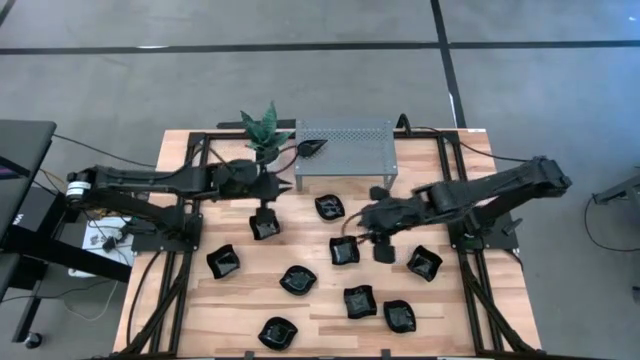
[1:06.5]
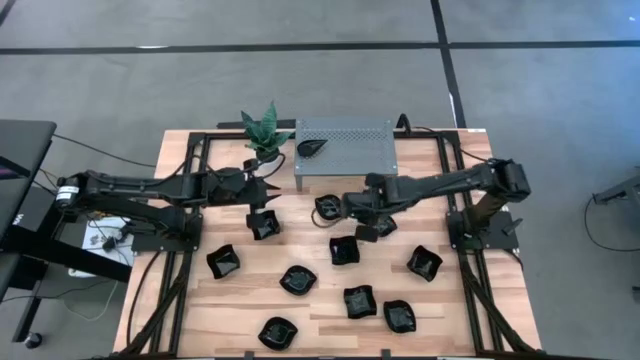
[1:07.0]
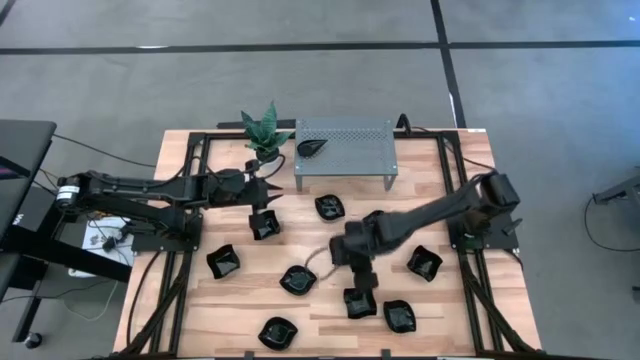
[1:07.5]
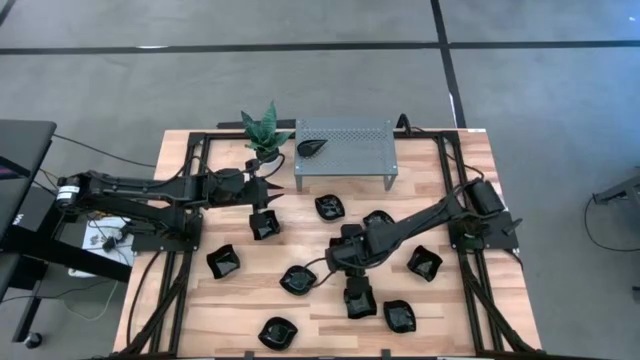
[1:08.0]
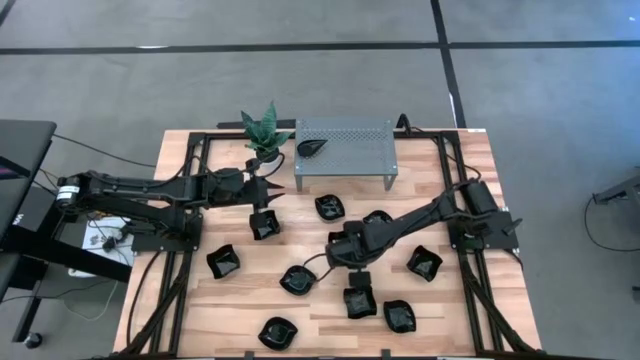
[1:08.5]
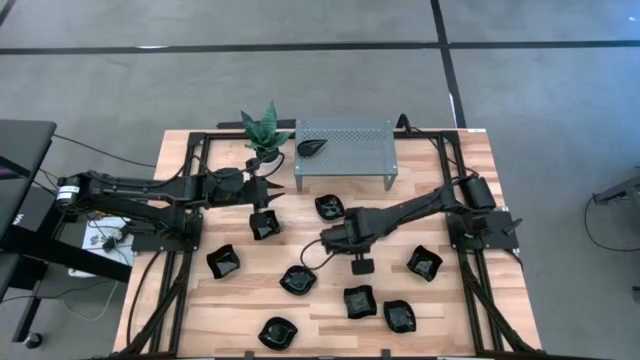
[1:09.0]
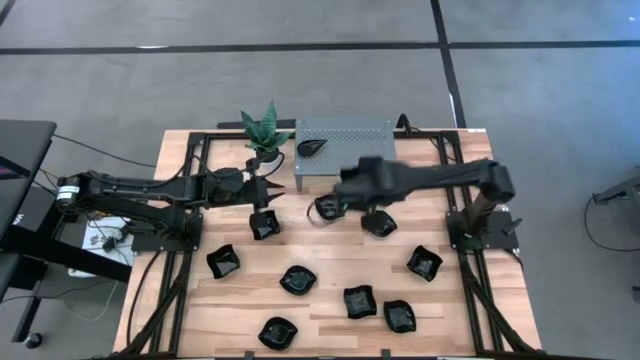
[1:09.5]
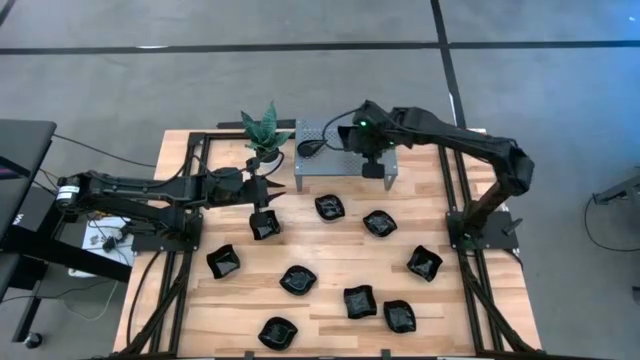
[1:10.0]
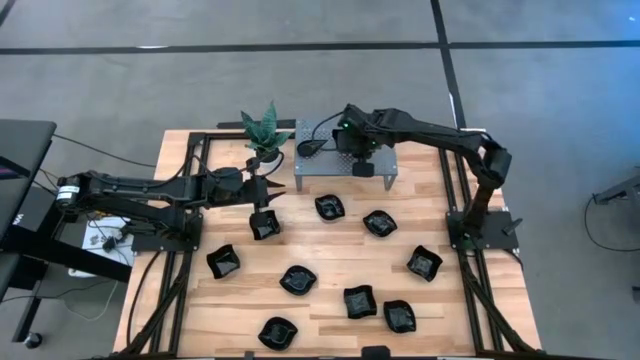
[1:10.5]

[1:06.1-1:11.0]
Task: Pick & Place Mini shaped plates
Put the distorted square plate on the shelf

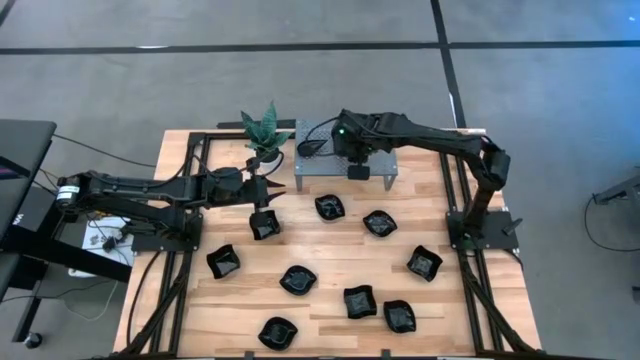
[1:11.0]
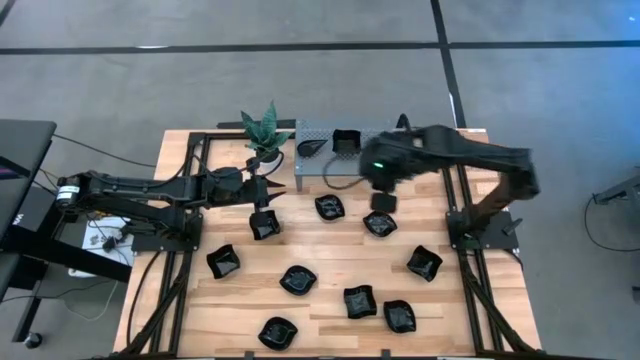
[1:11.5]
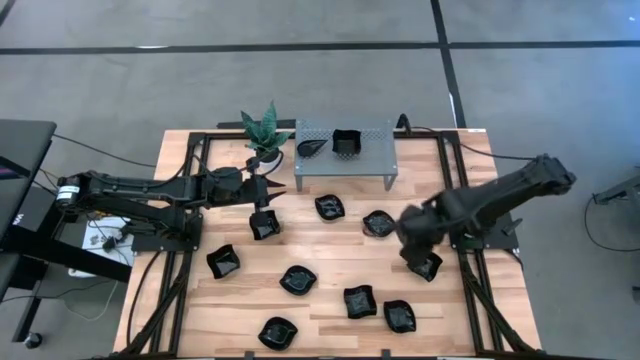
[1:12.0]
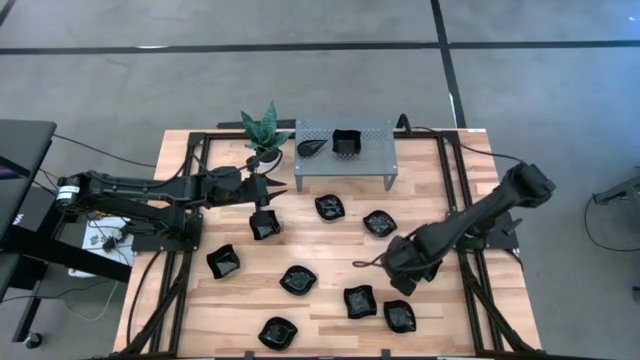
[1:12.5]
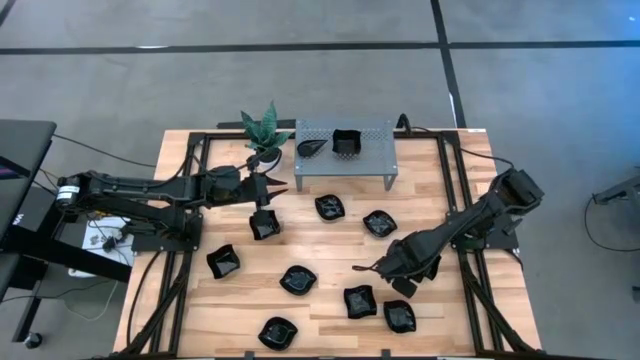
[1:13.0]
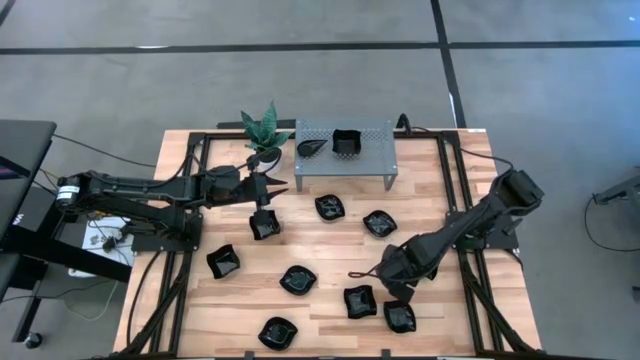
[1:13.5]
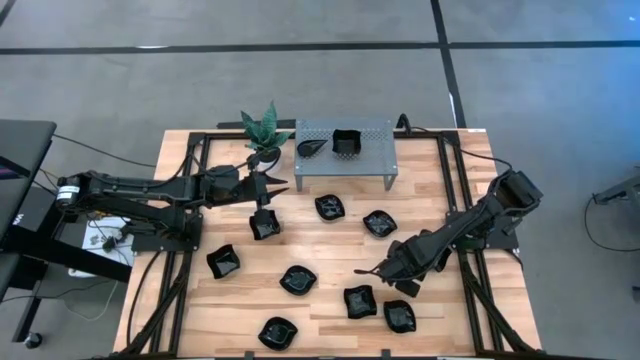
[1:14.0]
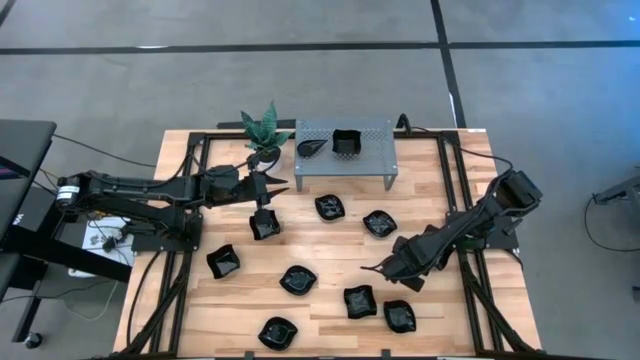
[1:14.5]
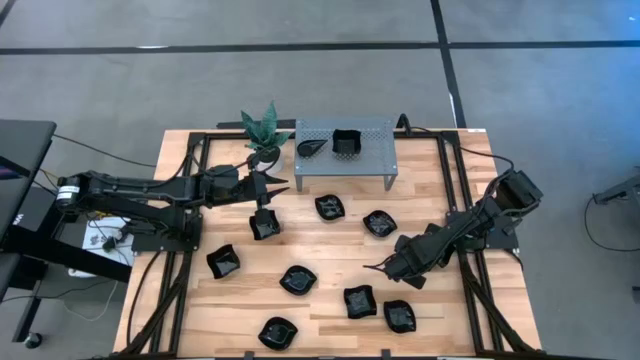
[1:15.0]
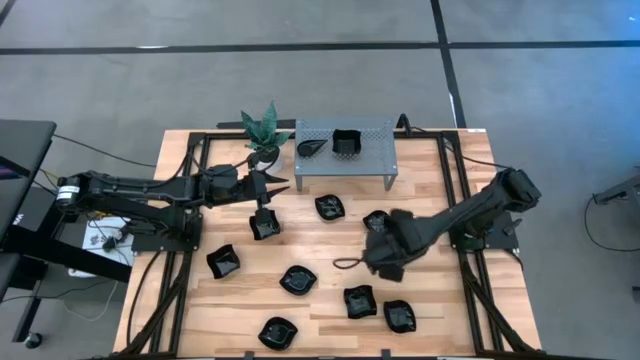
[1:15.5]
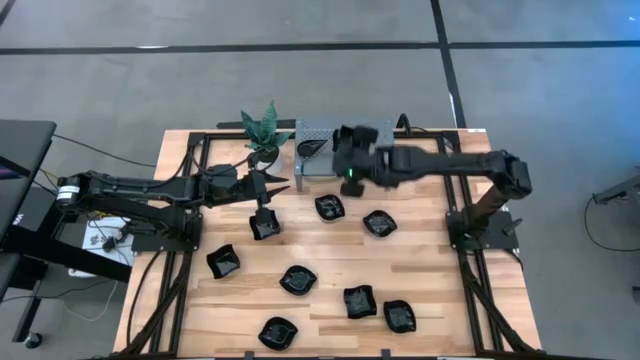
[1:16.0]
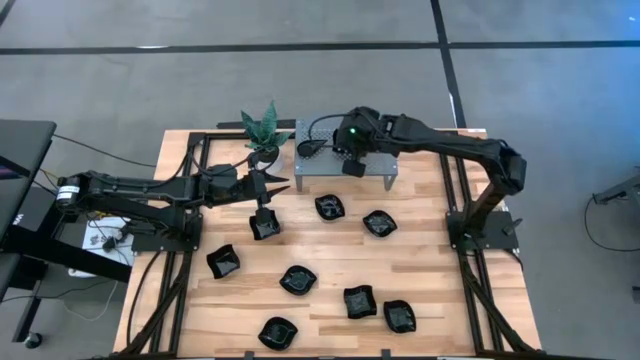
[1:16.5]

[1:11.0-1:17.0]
Stack the distorted square plate on top of the distorted square plate on the shelf

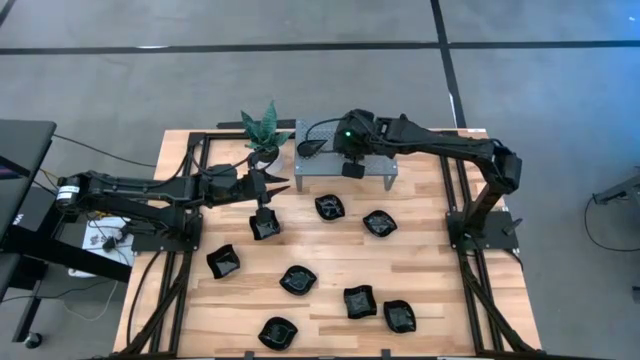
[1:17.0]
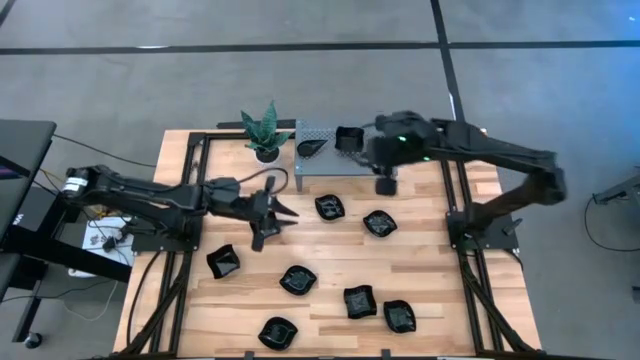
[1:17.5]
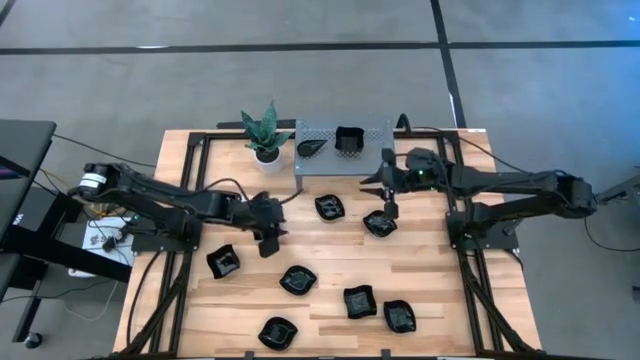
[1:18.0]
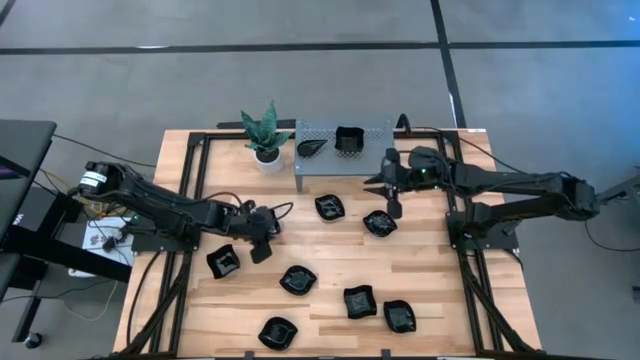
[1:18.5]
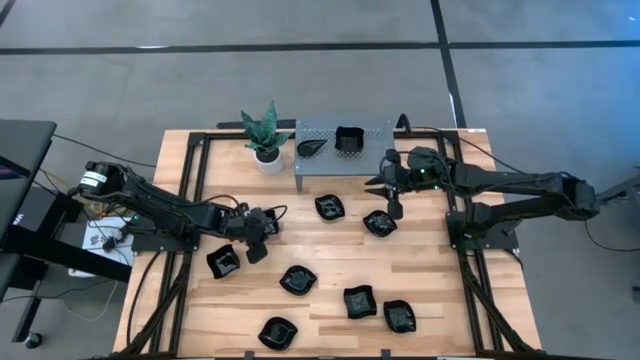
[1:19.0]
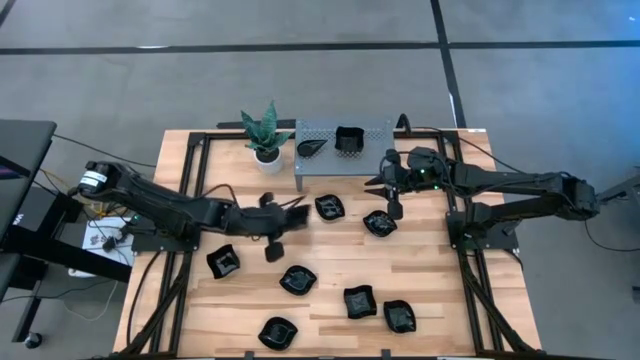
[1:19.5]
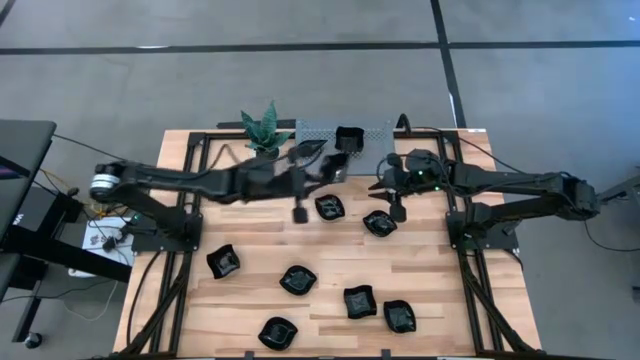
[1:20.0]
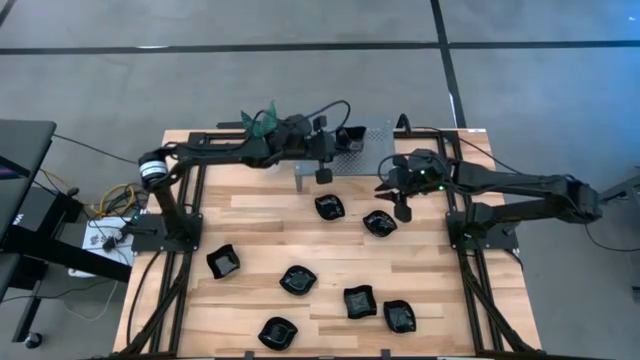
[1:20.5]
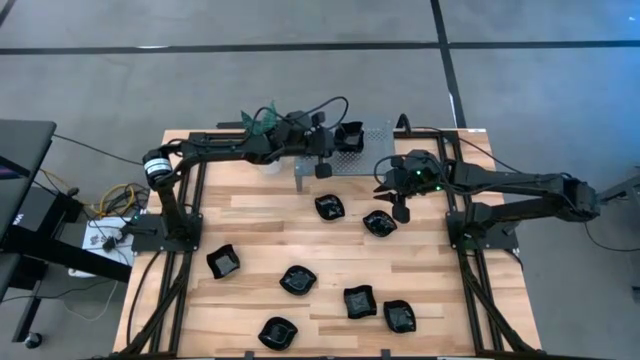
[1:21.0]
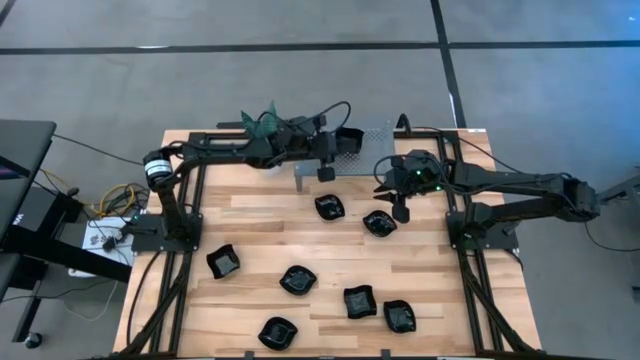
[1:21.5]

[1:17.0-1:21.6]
Stack the top distorted square plate on top of the distorted square plate on the shelf

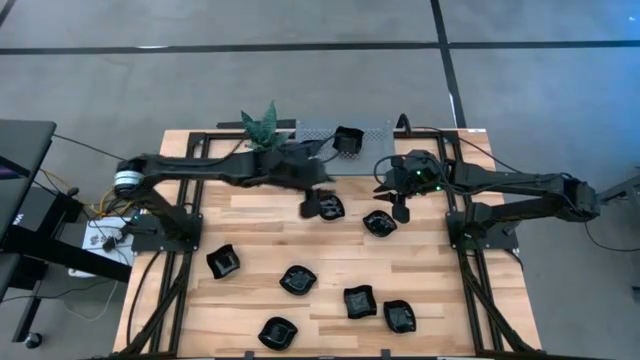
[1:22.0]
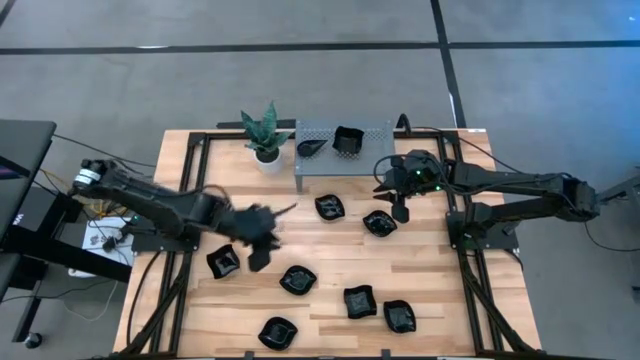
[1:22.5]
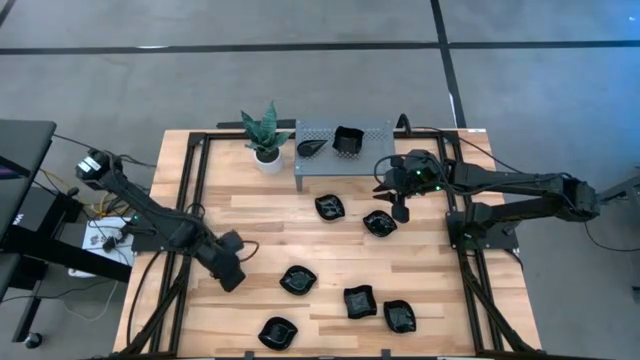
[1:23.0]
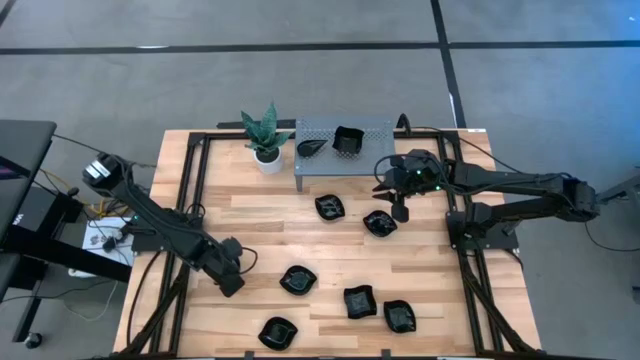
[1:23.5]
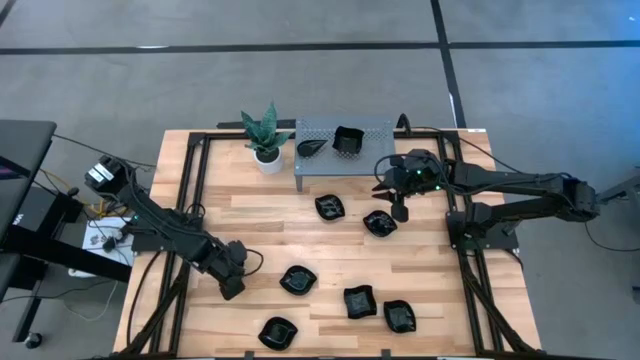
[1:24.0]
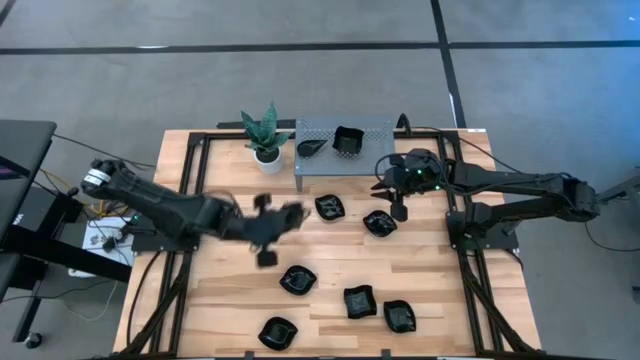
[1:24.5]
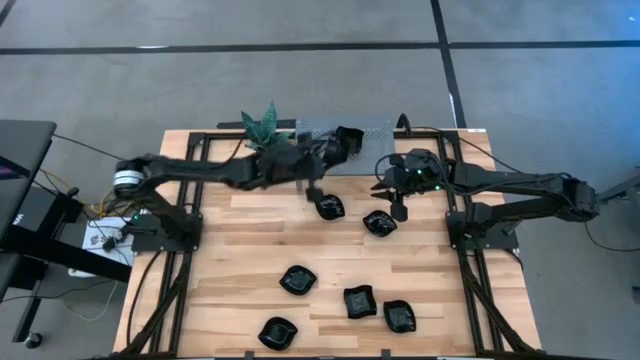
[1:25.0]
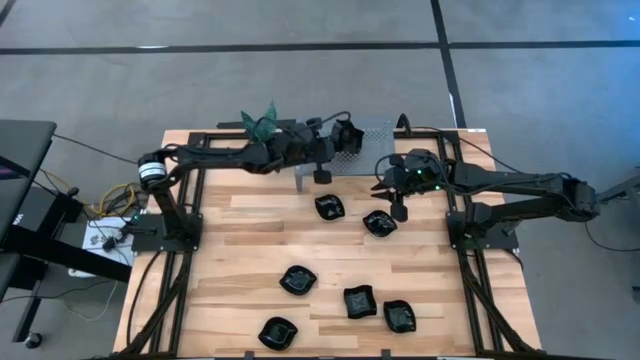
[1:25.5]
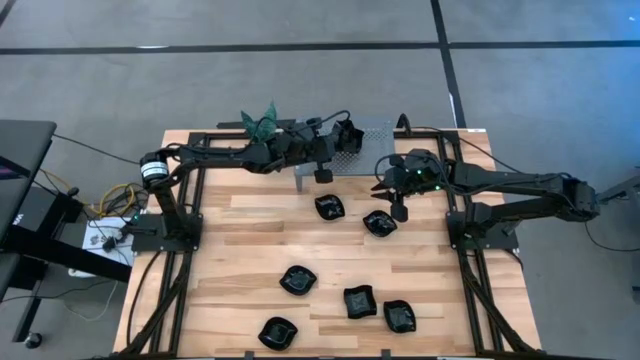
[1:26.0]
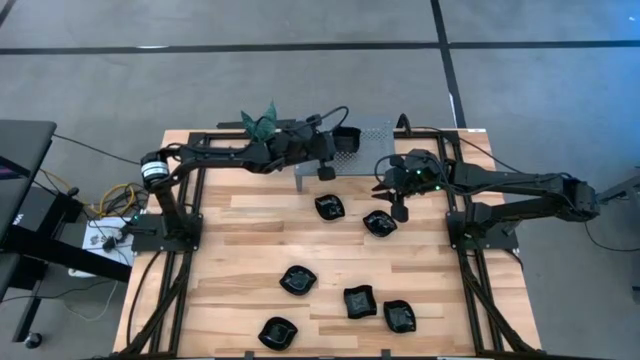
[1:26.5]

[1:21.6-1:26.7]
Stack the left distorted square plate on top of the distorted square plate on the shelf
